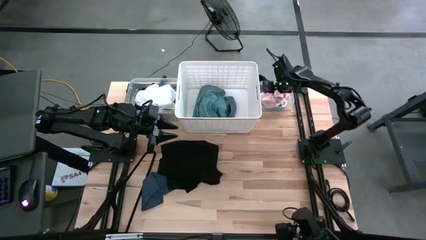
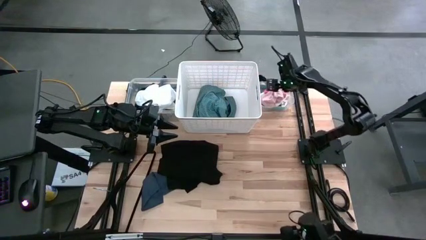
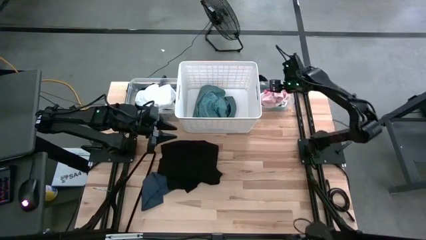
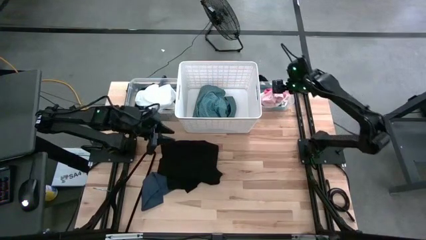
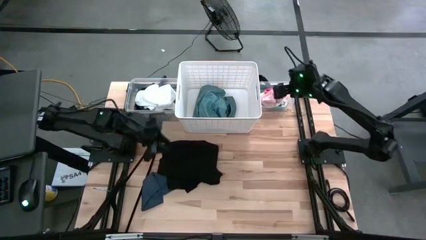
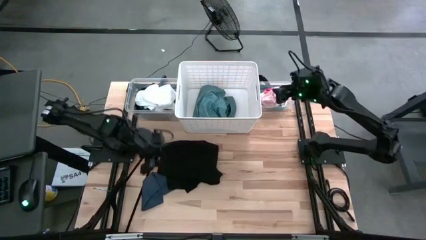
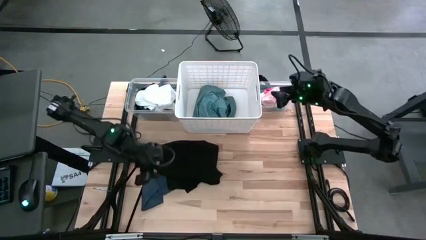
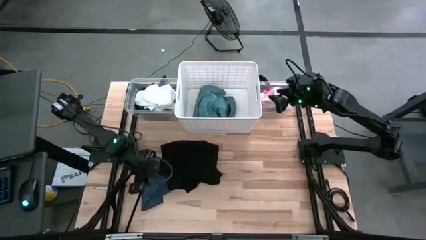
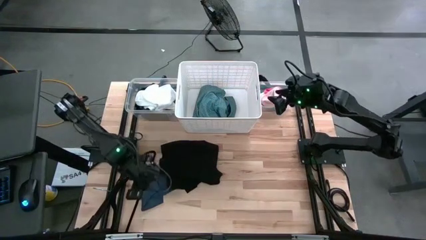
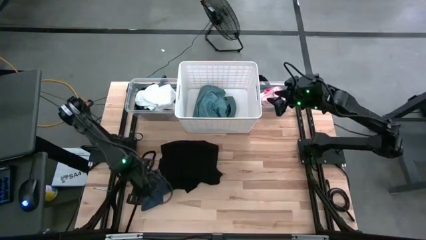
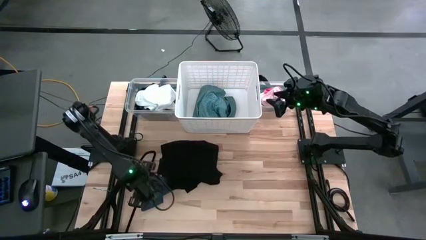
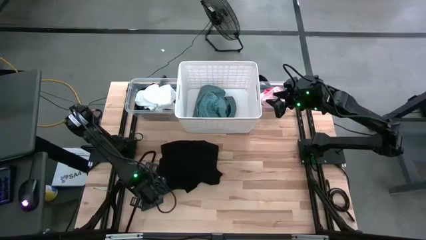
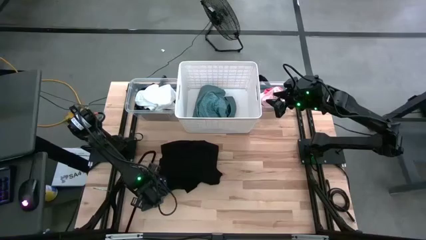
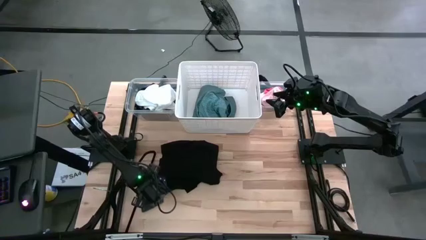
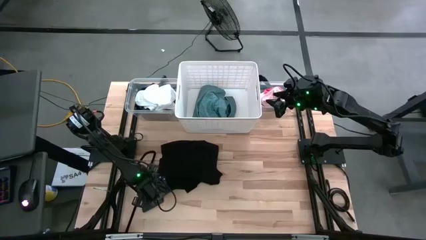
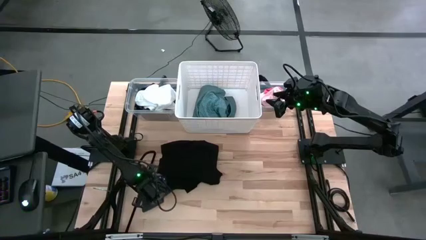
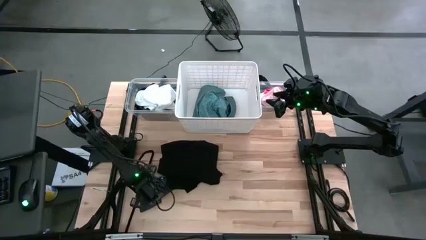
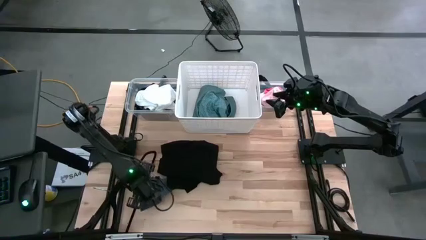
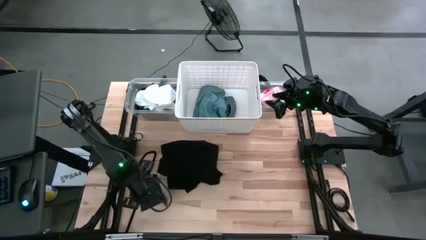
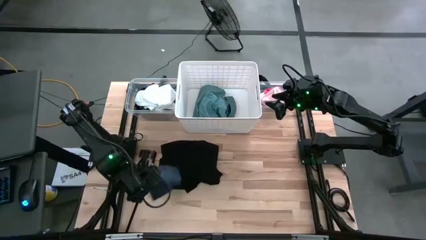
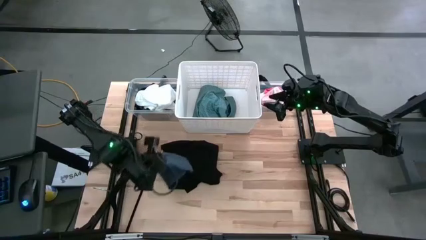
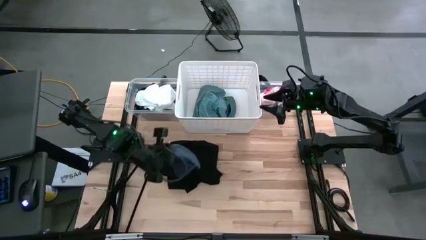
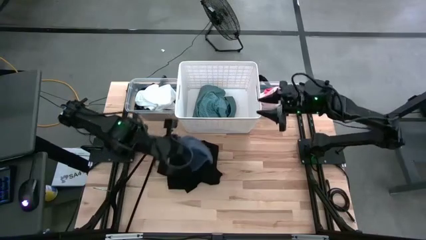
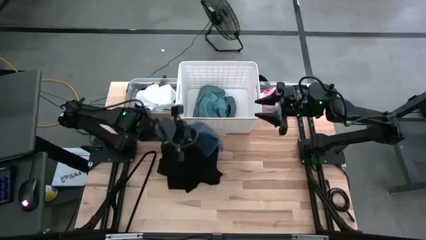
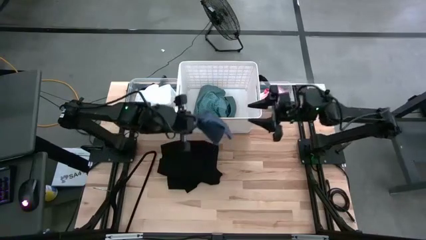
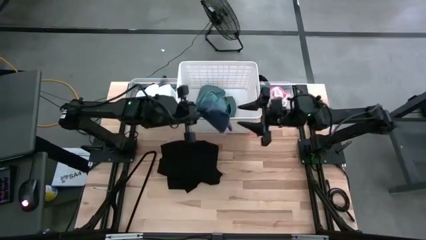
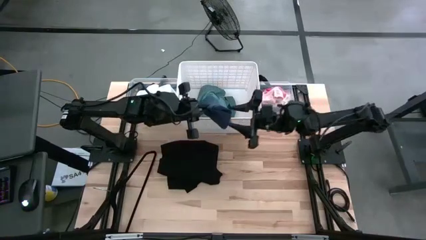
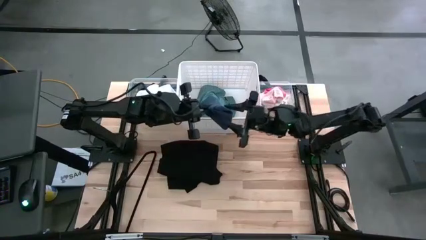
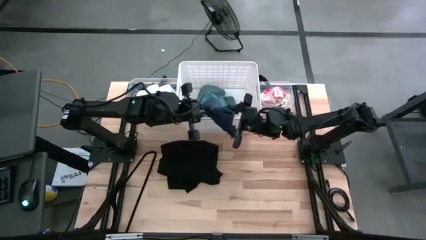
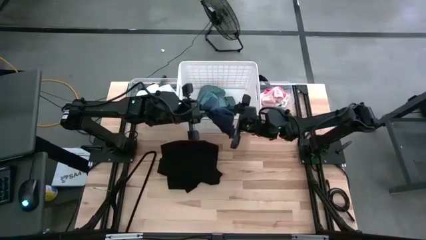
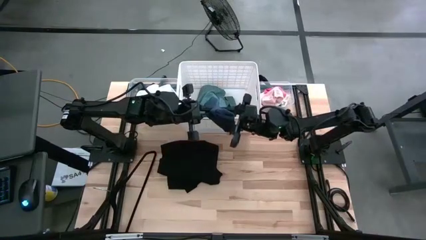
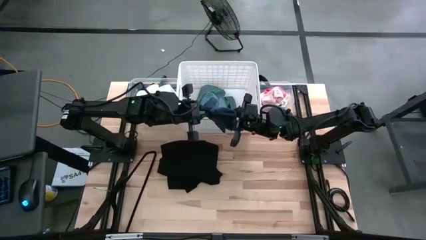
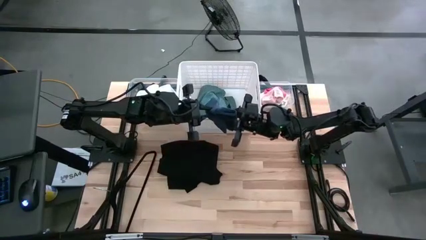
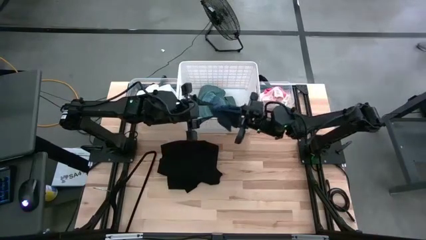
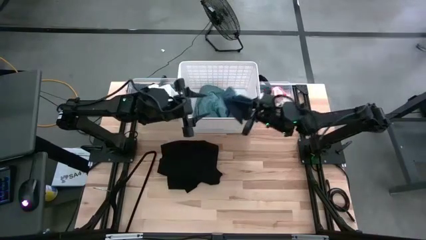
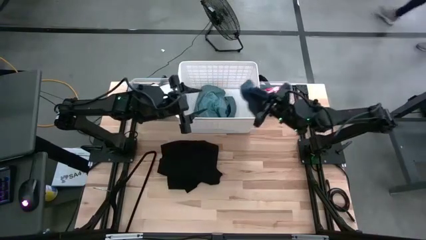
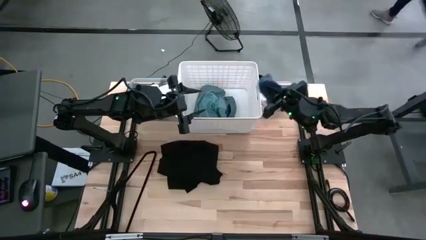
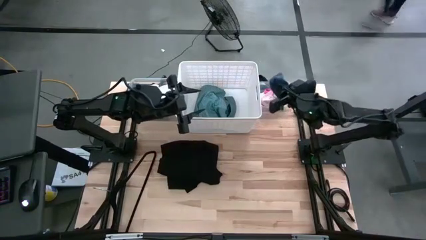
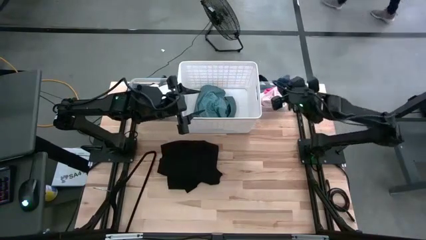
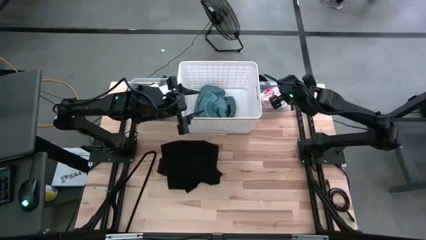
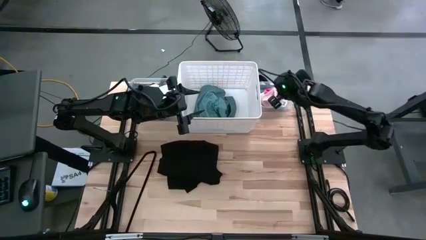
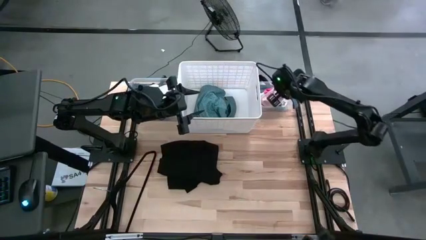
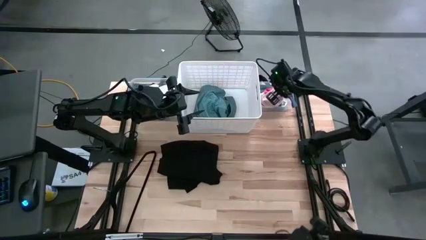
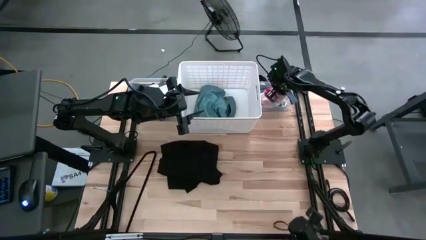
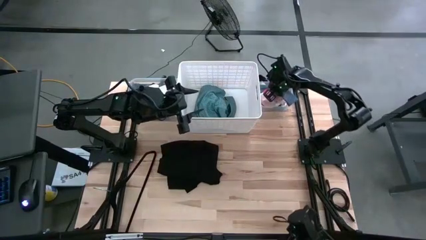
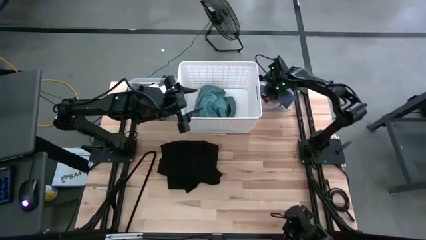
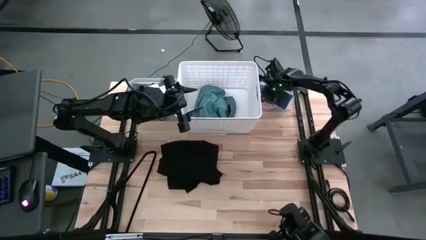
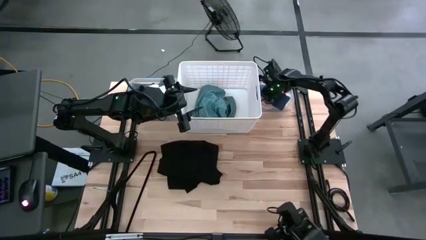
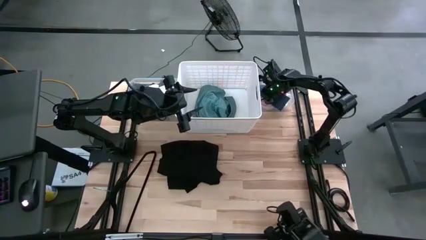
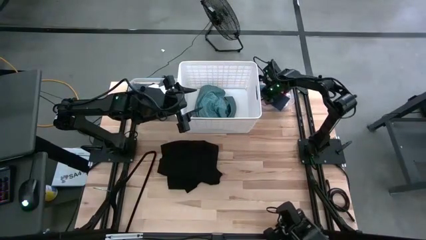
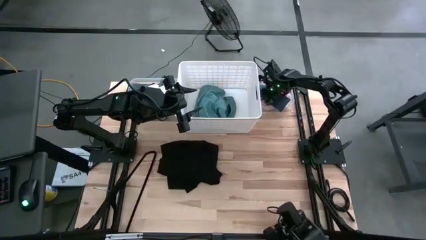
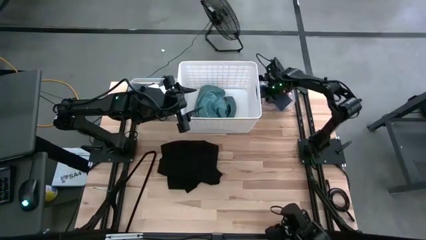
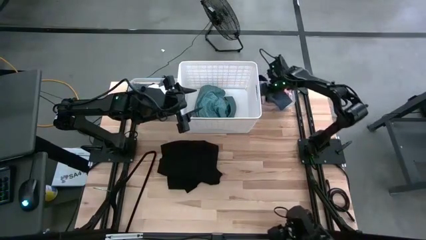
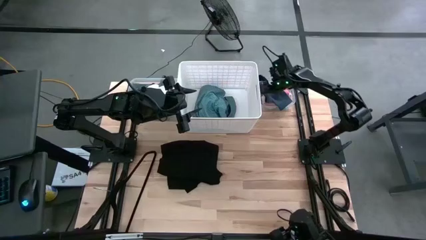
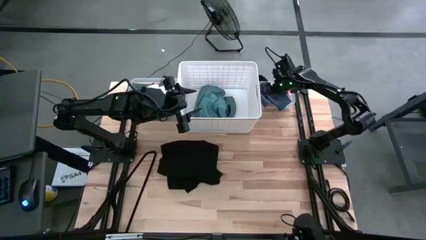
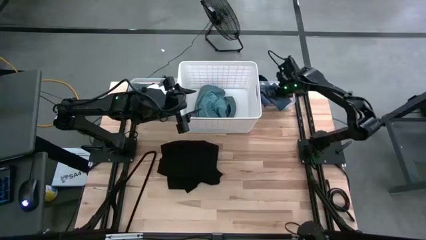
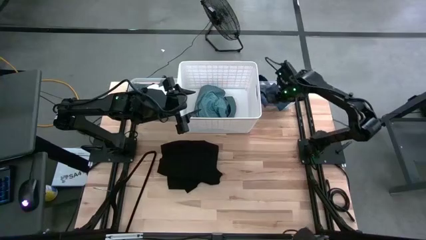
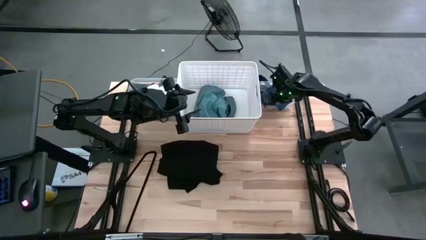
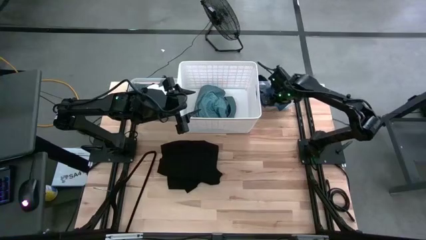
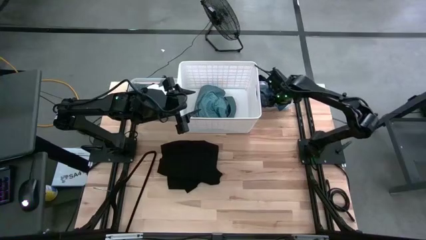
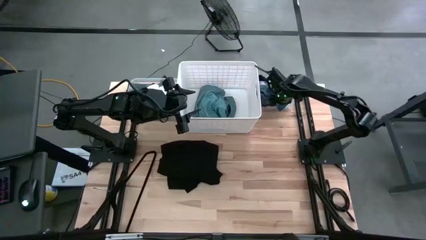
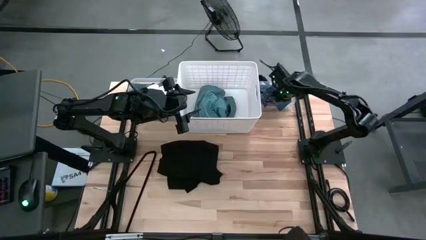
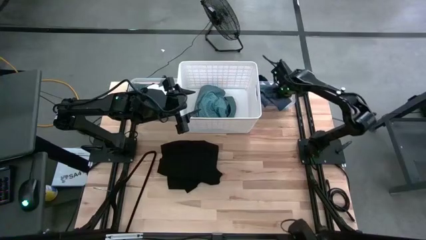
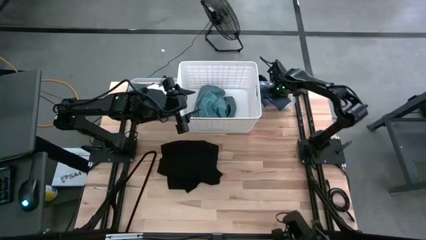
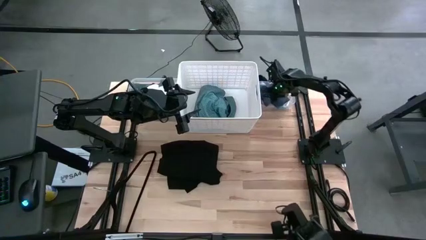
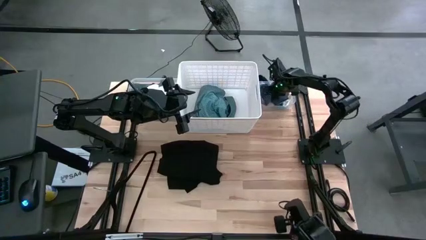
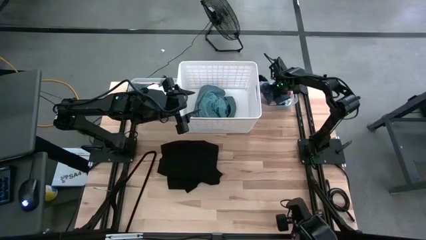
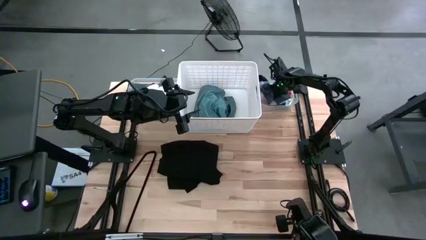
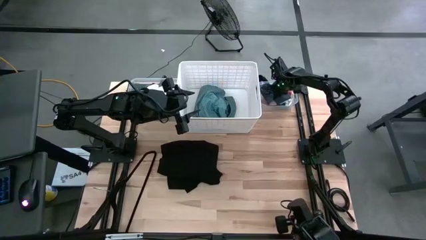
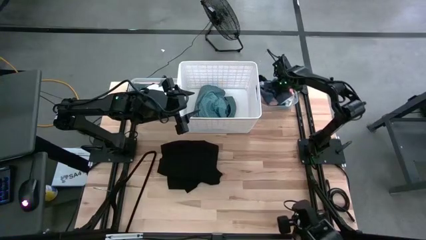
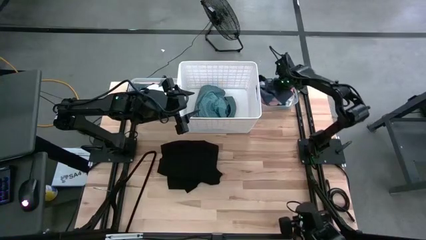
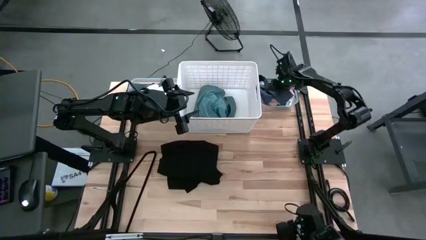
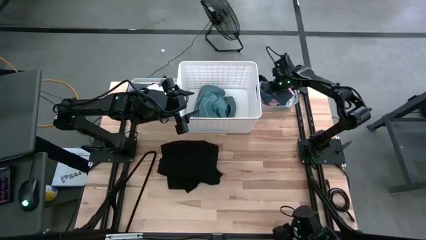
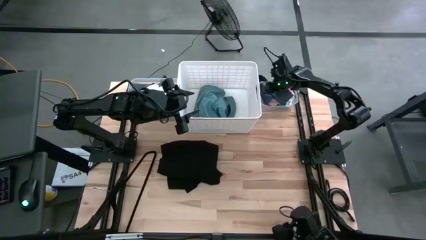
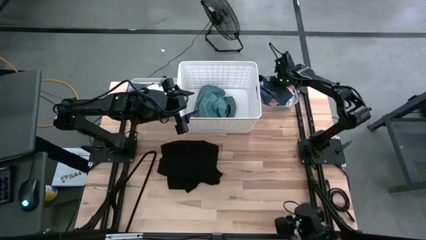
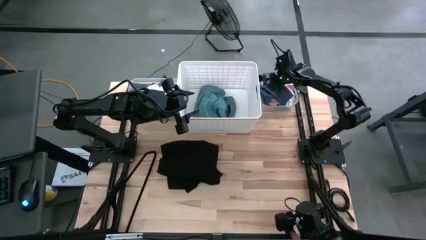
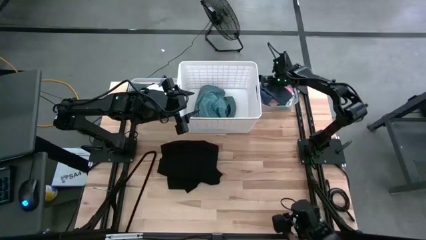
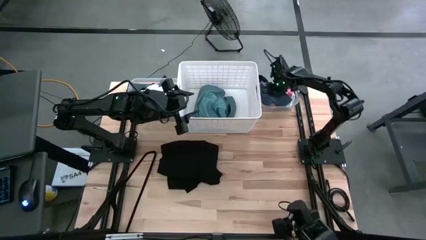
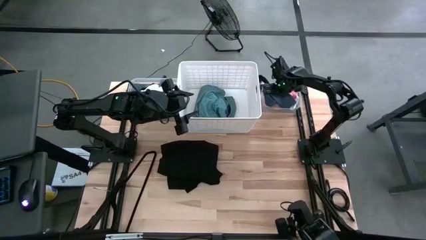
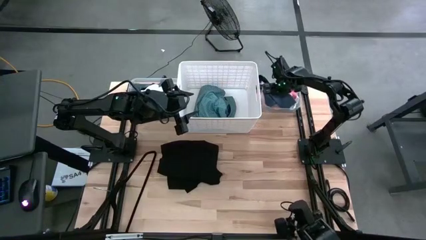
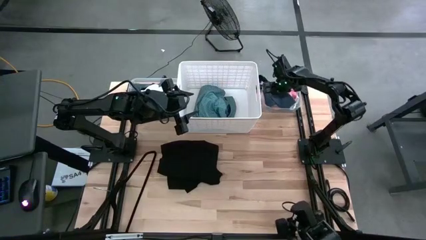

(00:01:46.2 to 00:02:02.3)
Task: Pick & Place Cloths
Put the blue sock into the right transparent bin
